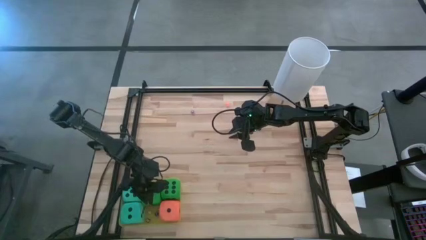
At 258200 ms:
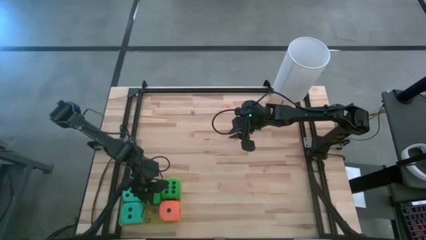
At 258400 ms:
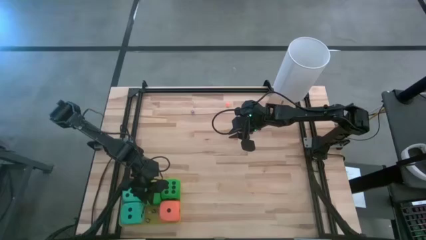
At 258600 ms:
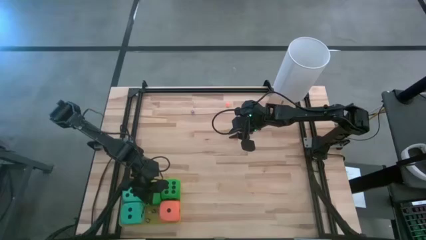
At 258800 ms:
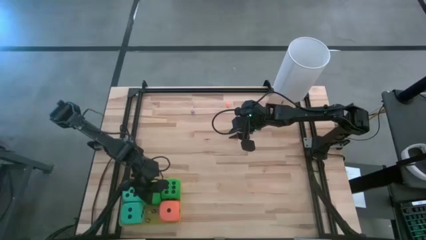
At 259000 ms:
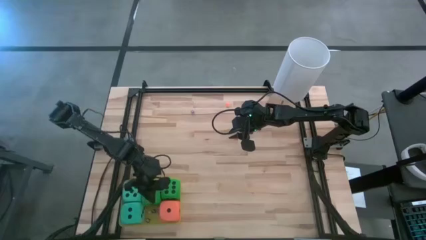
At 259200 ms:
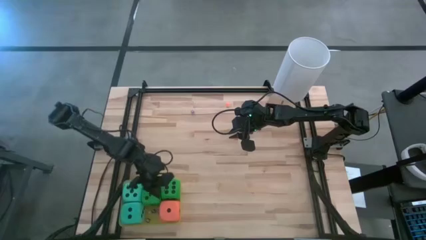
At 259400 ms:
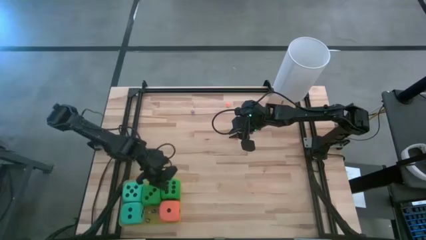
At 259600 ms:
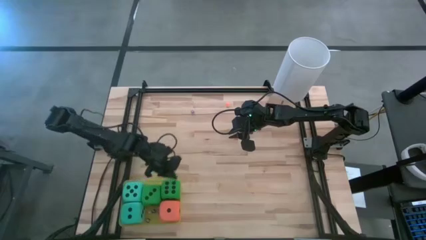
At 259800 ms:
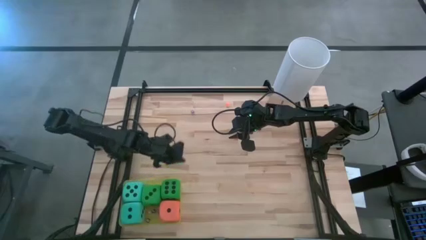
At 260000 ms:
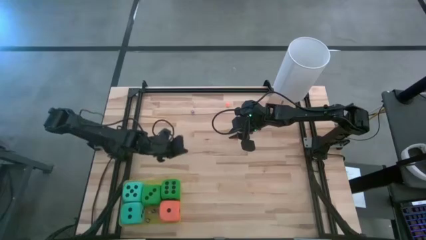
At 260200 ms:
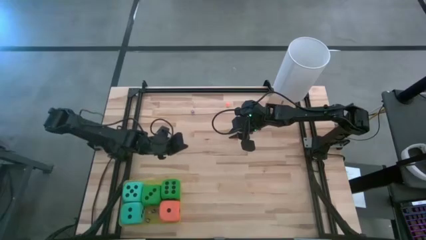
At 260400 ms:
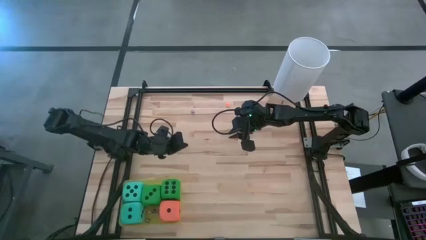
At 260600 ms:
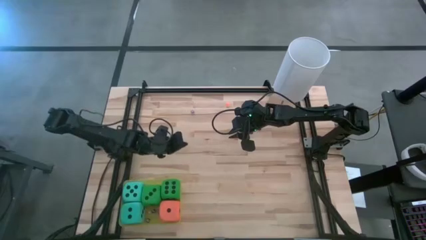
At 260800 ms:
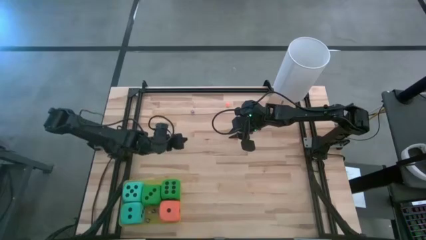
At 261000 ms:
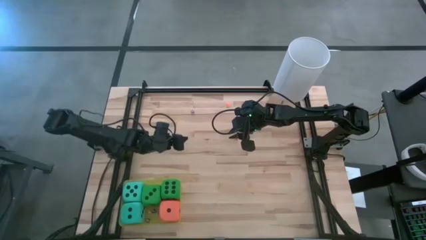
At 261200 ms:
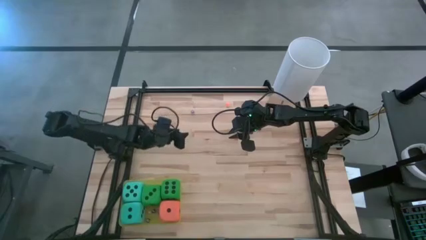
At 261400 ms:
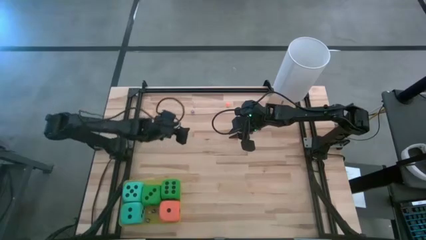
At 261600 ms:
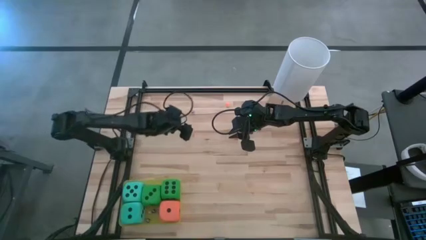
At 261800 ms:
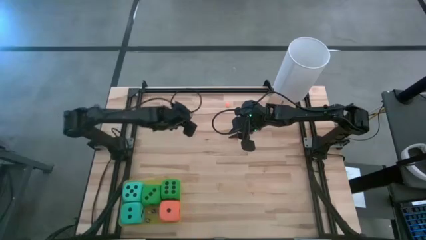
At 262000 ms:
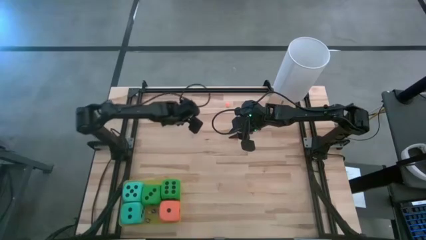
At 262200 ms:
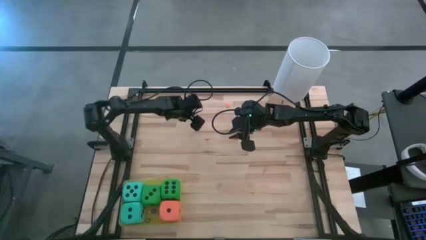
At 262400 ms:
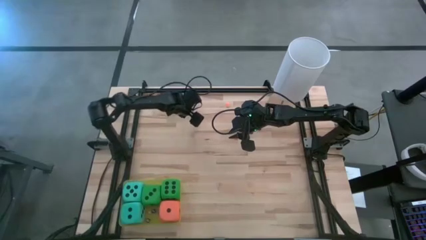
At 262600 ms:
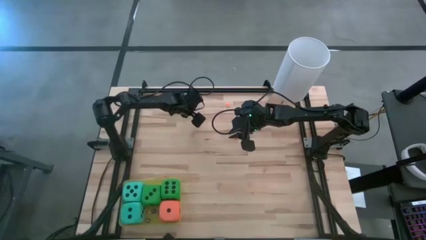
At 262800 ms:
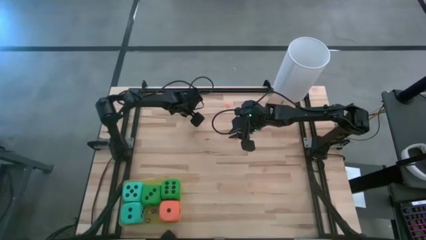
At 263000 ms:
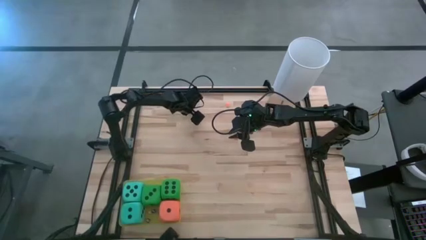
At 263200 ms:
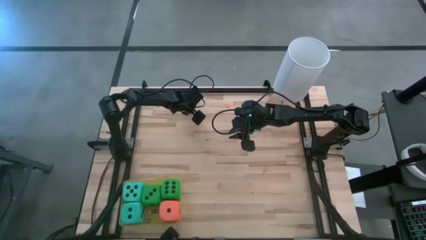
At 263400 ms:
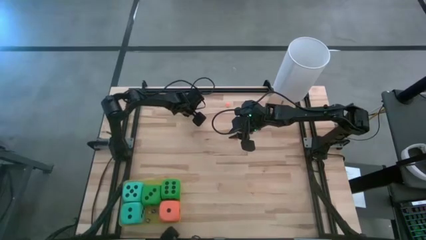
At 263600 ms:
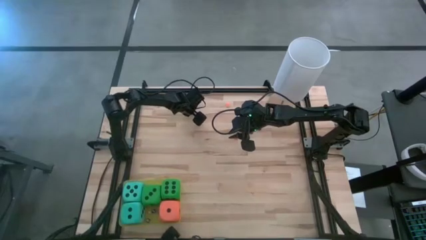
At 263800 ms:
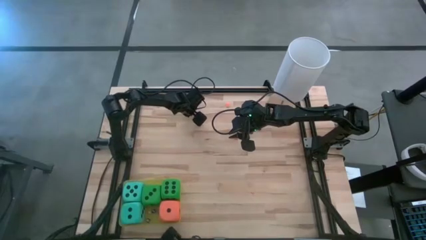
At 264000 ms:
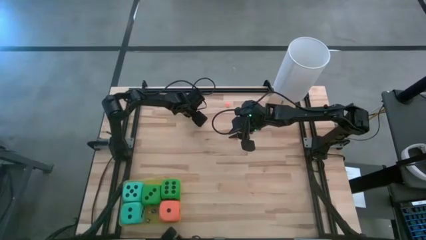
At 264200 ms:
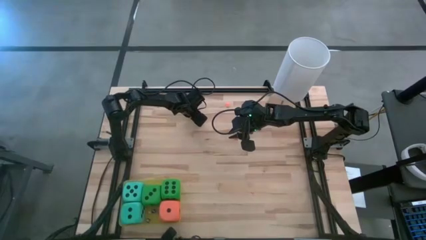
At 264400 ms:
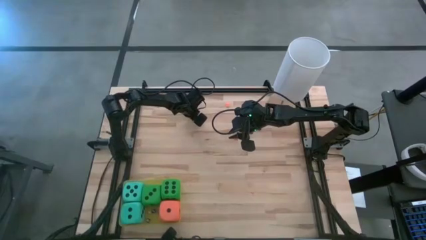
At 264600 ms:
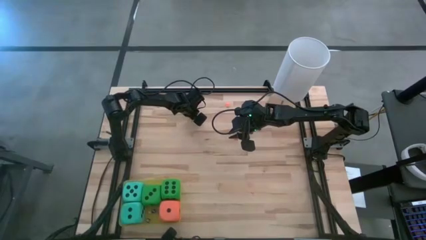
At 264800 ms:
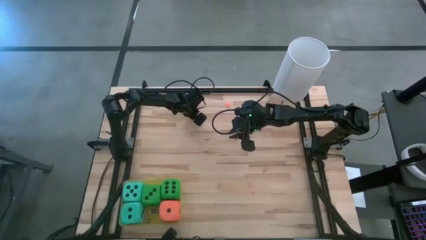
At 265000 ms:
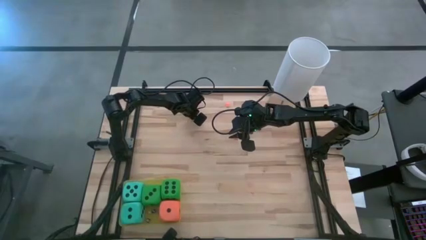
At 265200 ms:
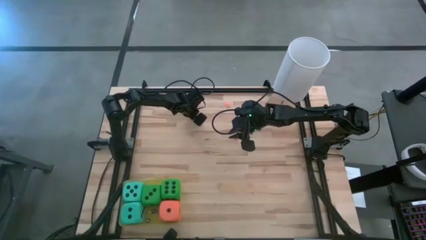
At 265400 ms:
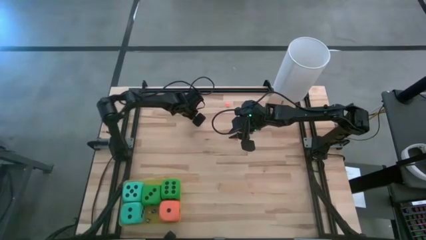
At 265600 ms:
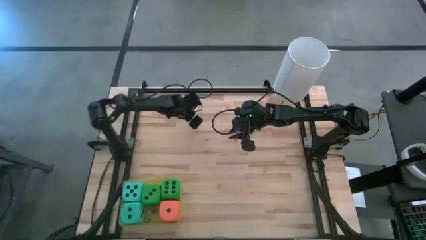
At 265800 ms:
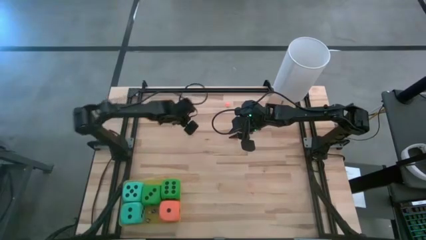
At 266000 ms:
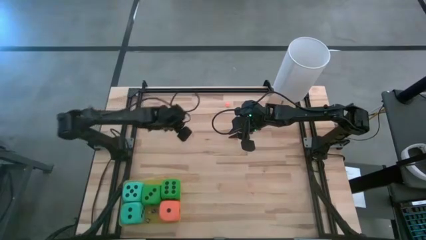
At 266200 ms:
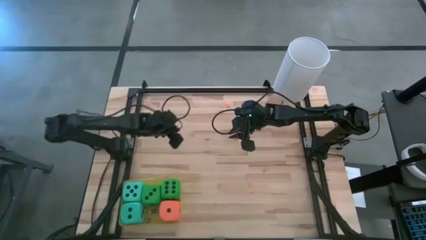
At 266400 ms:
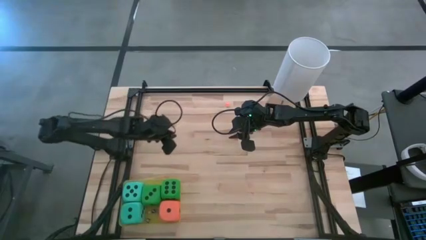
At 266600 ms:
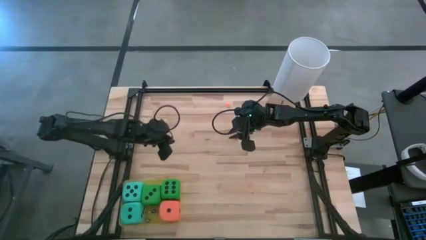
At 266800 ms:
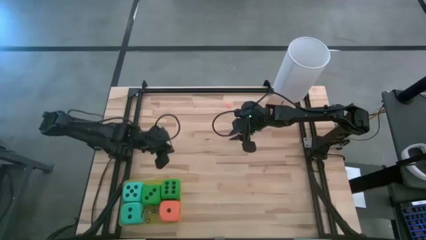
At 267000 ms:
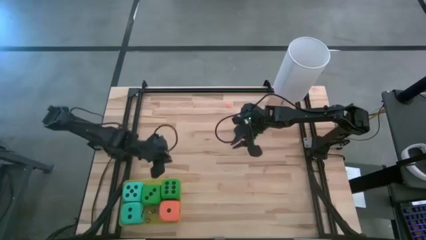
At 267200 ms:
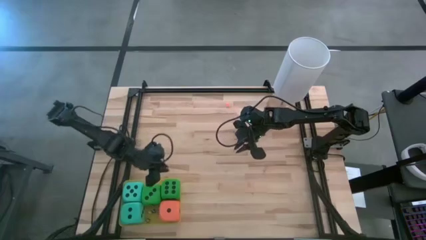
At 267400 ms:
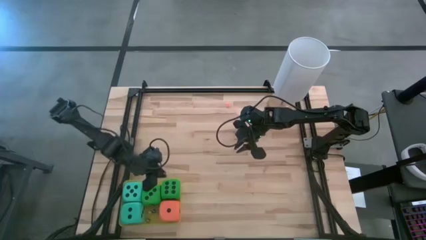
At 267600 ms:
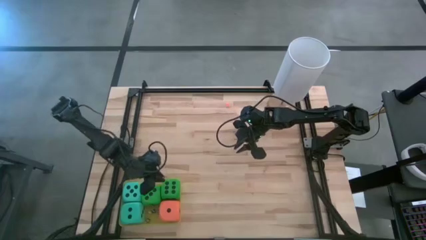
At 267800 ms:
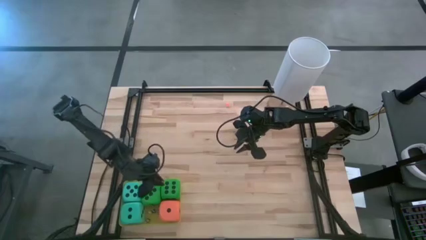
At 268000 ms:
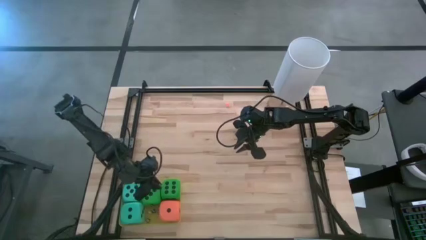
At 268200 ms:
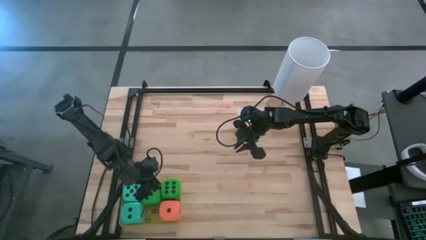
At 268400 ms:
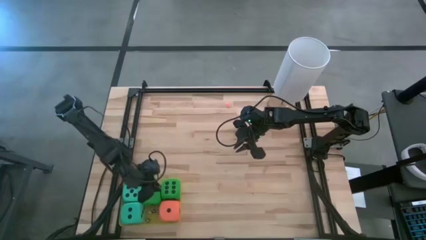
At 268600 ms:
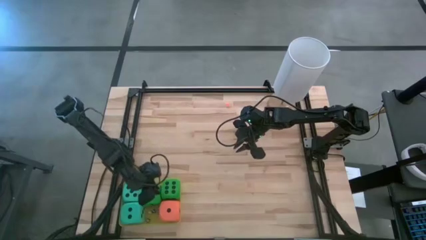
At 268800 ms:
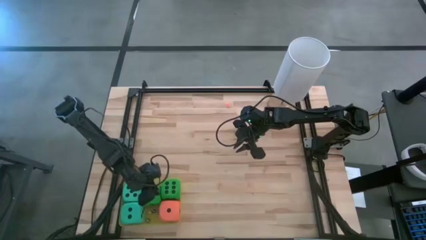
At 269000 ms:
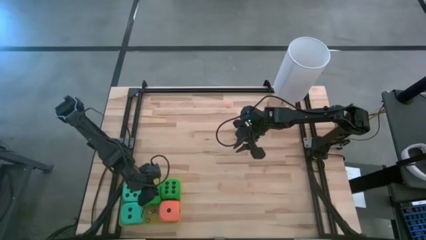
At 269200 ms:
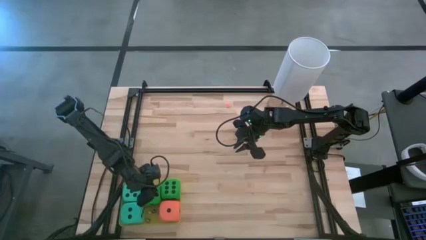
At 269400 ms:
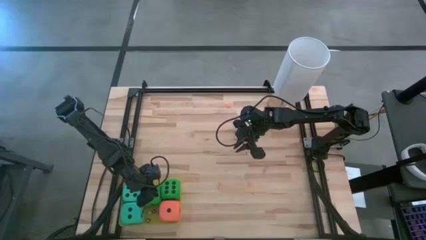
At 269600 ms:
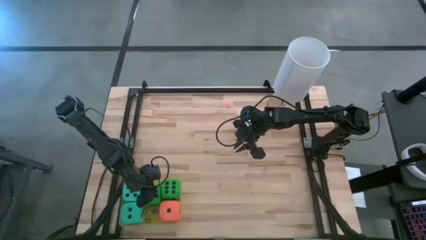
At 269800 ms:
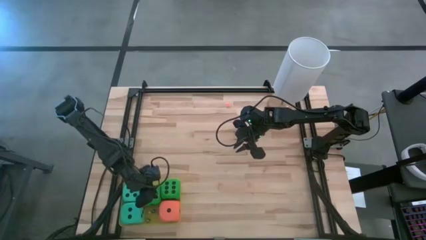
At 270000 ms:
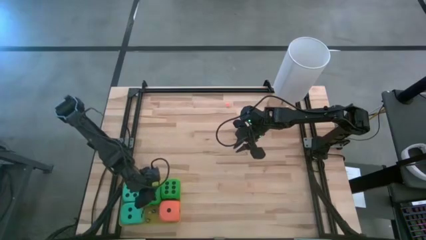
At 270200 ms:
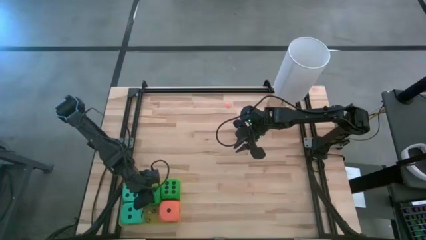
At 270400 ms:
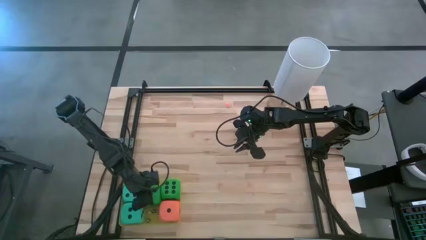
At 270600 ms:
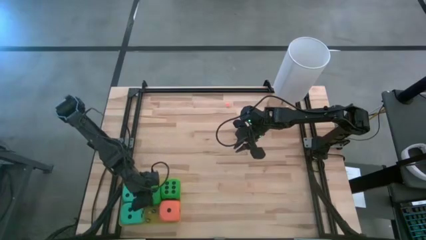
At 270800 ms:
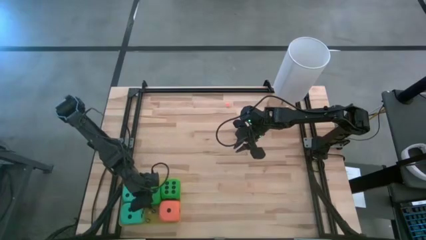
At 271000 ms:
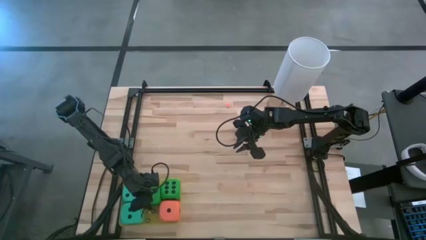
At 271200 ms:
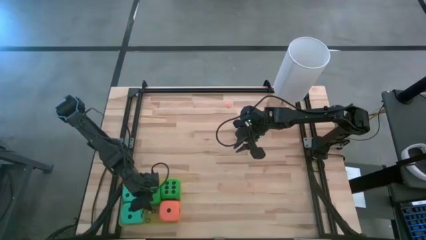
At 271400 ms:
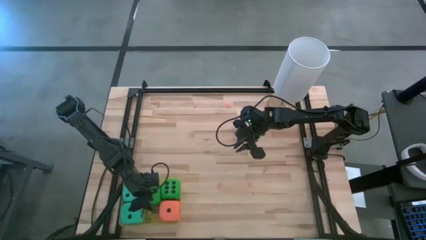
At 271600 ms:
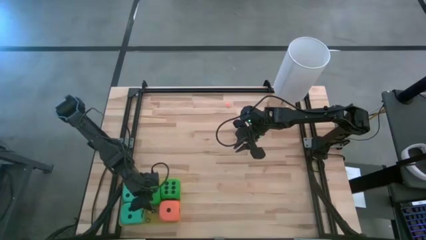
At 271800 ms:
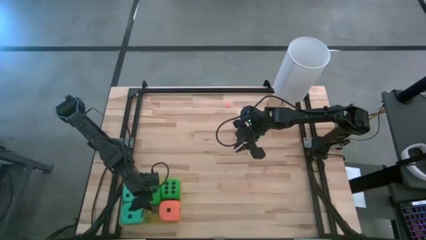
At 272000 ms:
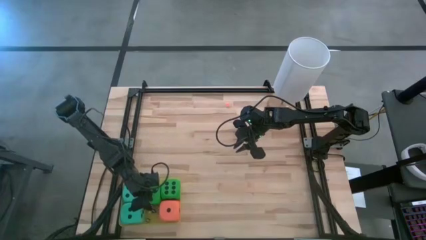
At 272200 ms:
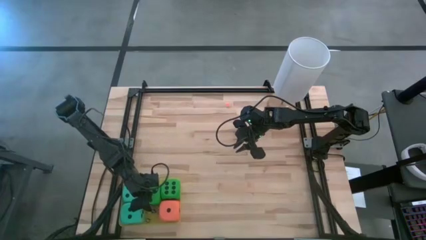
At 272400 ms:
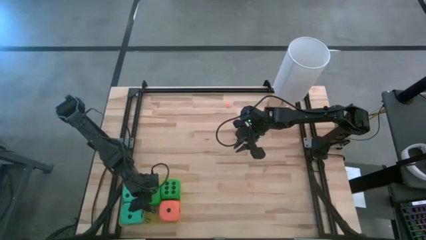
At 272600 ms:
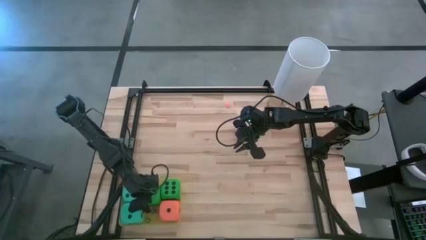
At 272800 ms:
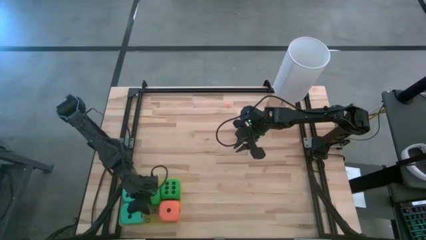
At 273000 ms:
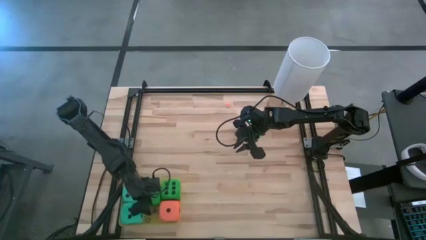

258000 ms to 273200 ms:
Task: Pick & Place Dice
Put the purple dice into the yellow bin
